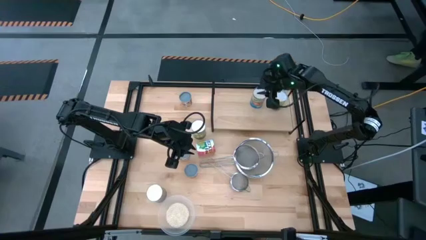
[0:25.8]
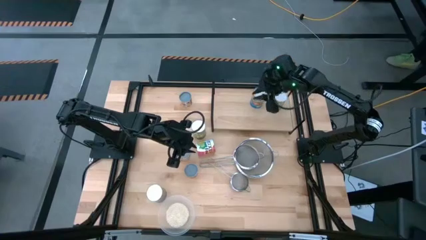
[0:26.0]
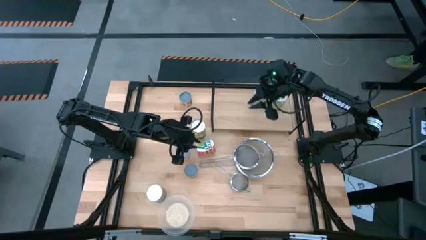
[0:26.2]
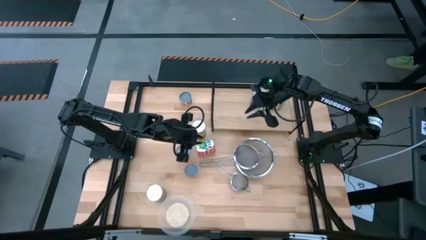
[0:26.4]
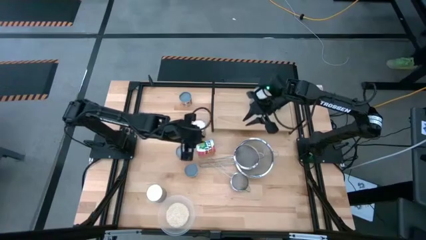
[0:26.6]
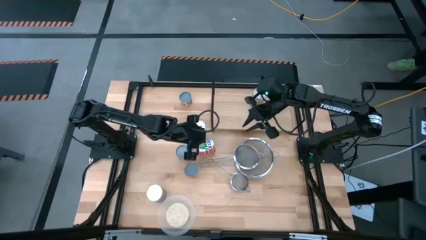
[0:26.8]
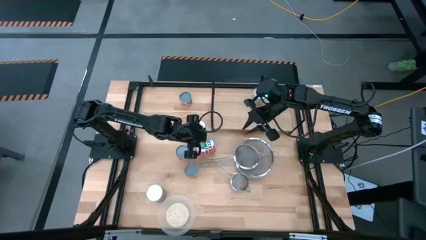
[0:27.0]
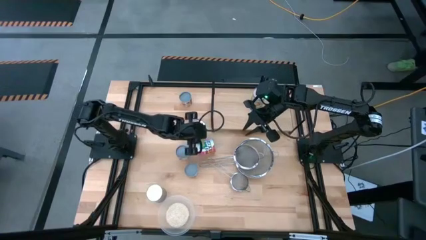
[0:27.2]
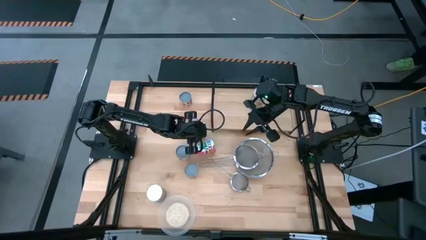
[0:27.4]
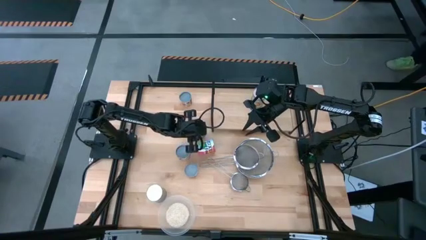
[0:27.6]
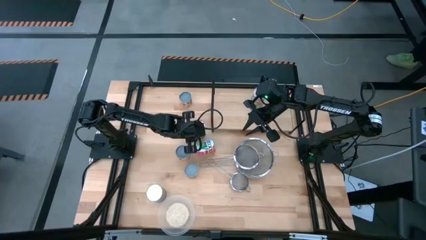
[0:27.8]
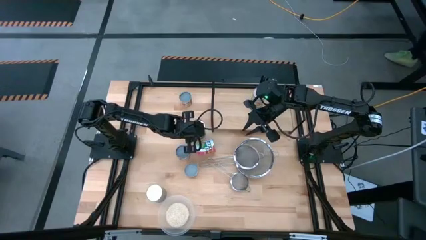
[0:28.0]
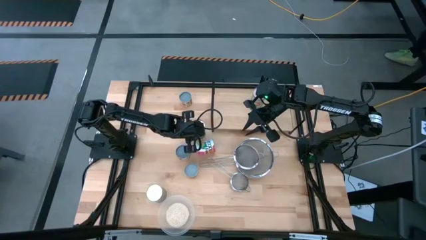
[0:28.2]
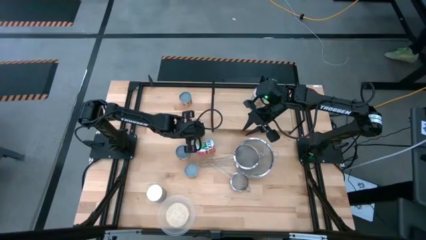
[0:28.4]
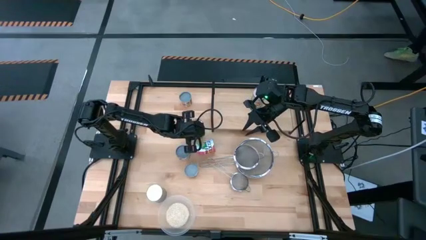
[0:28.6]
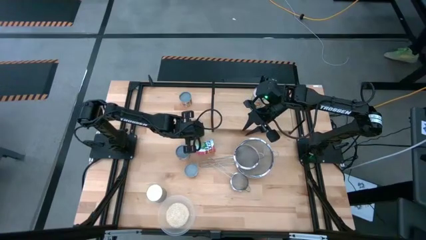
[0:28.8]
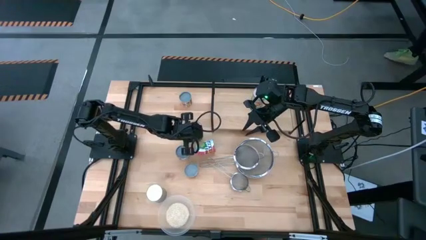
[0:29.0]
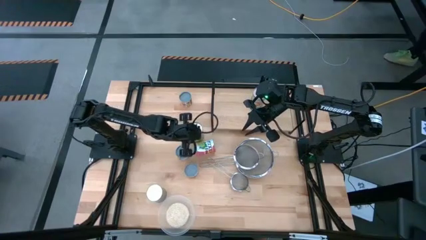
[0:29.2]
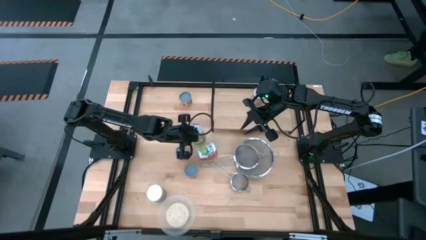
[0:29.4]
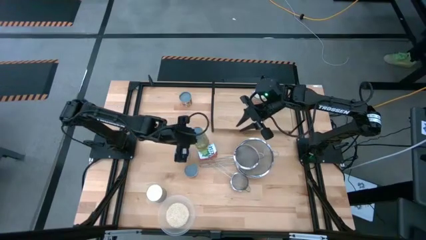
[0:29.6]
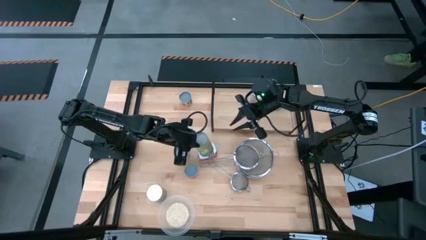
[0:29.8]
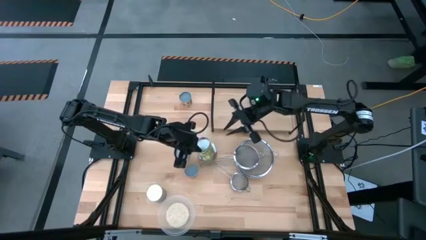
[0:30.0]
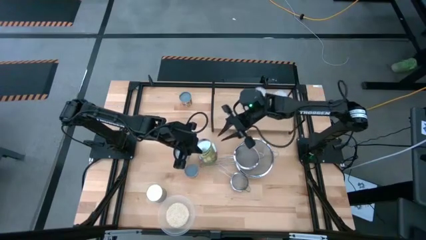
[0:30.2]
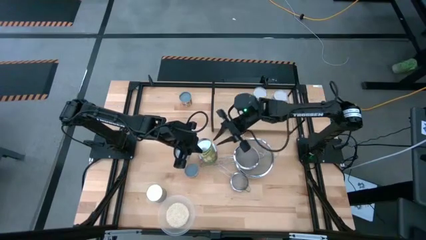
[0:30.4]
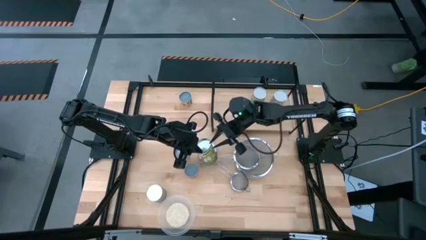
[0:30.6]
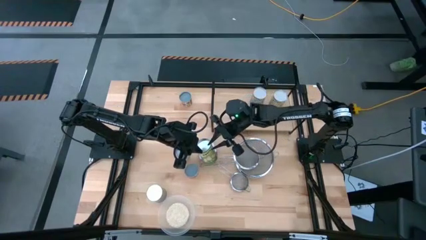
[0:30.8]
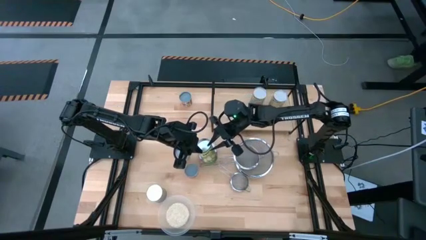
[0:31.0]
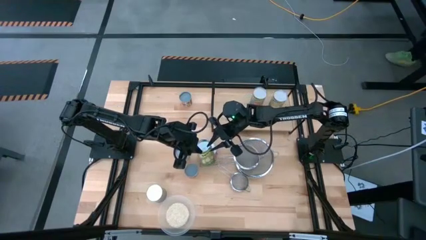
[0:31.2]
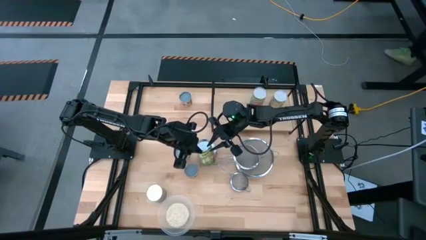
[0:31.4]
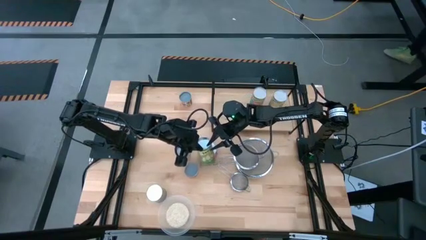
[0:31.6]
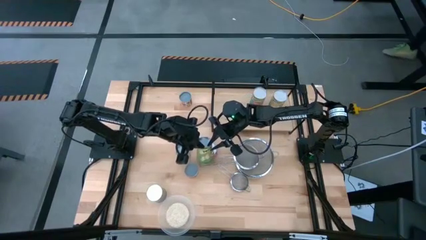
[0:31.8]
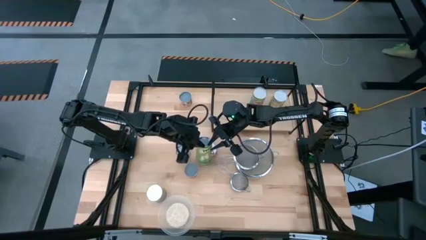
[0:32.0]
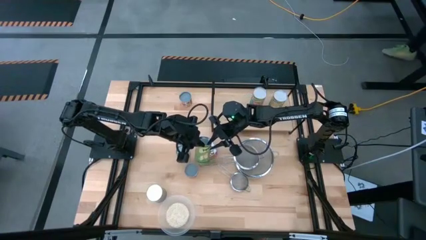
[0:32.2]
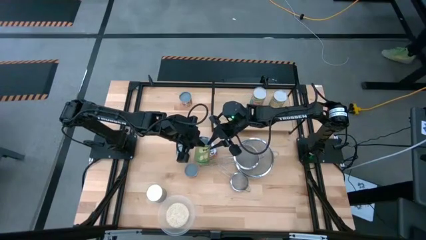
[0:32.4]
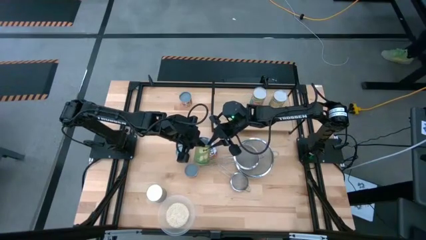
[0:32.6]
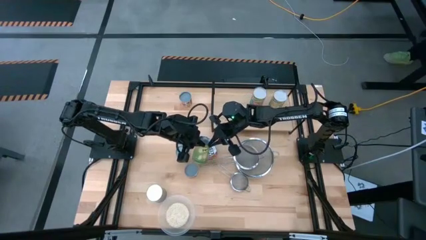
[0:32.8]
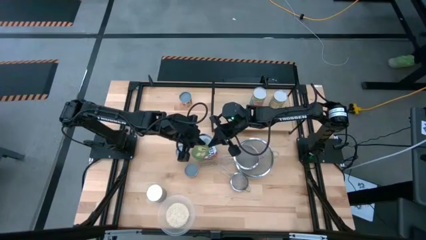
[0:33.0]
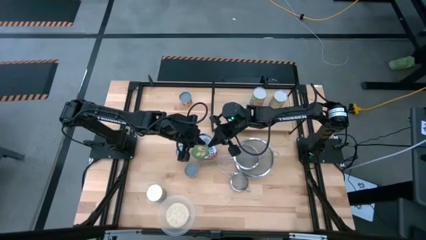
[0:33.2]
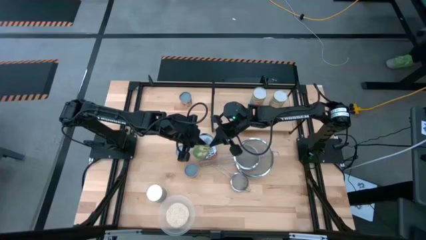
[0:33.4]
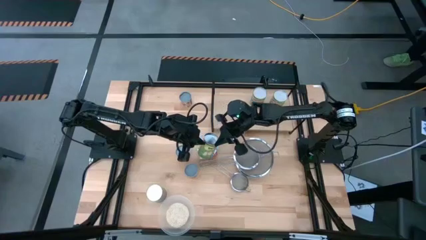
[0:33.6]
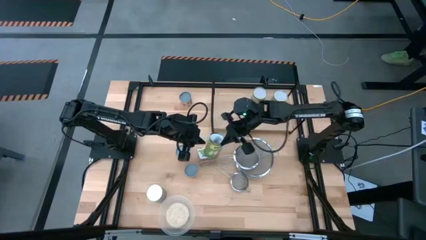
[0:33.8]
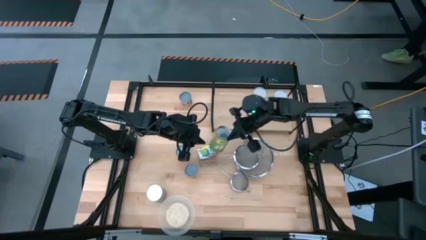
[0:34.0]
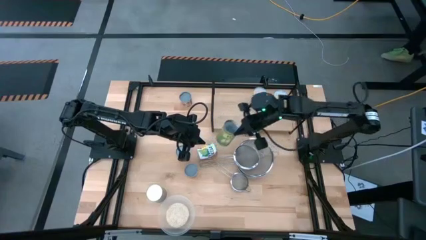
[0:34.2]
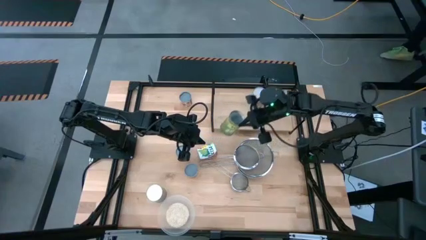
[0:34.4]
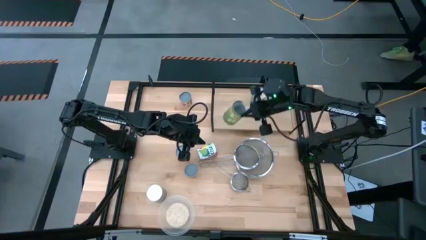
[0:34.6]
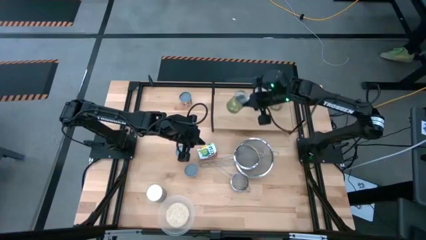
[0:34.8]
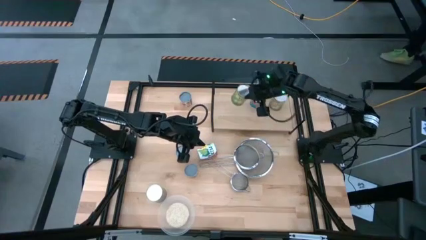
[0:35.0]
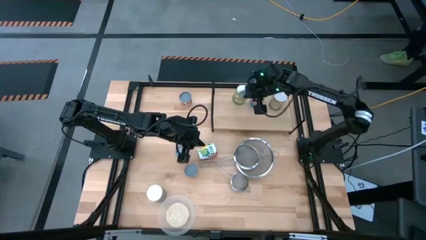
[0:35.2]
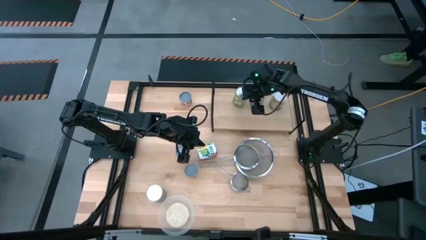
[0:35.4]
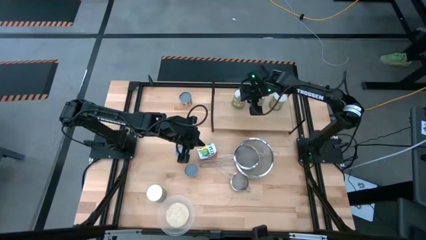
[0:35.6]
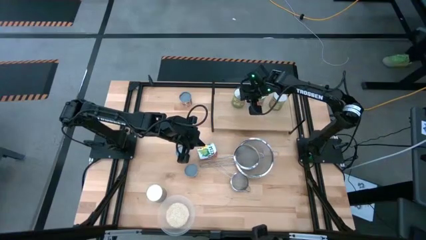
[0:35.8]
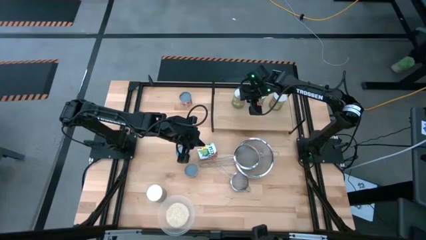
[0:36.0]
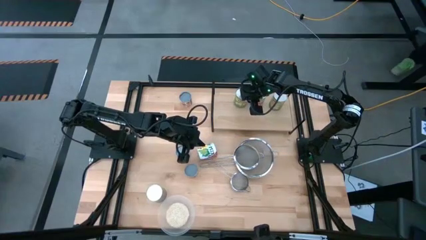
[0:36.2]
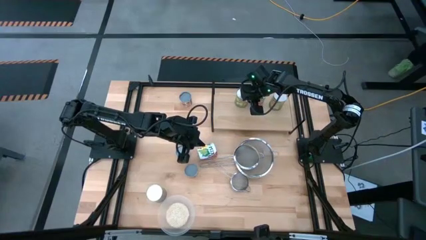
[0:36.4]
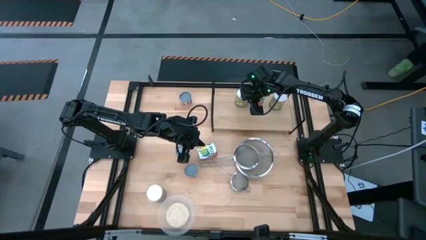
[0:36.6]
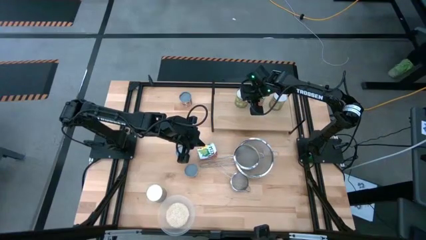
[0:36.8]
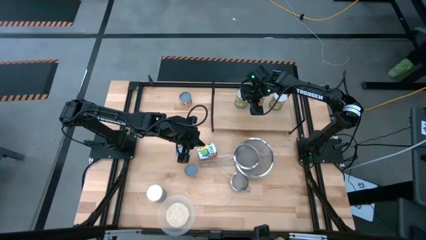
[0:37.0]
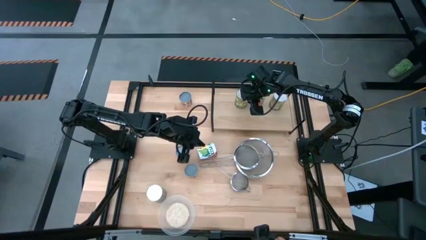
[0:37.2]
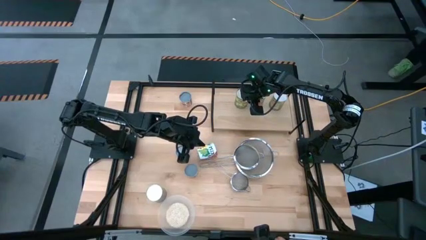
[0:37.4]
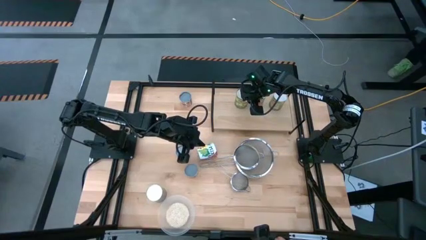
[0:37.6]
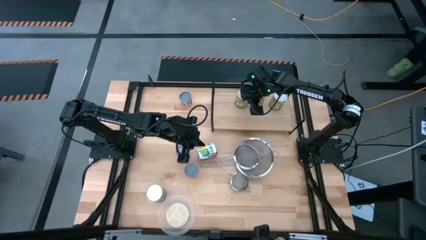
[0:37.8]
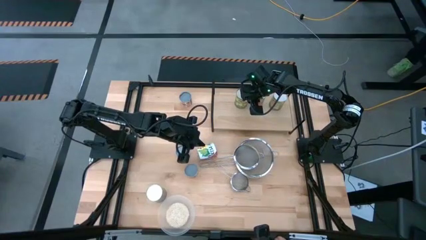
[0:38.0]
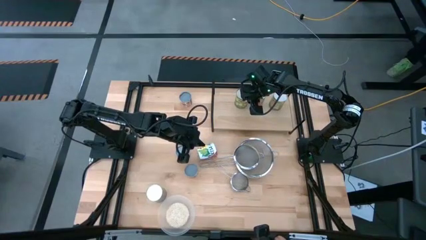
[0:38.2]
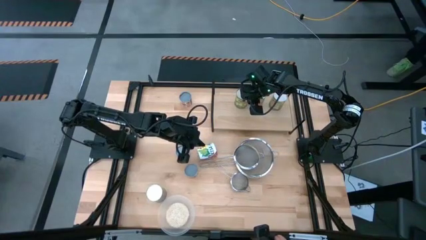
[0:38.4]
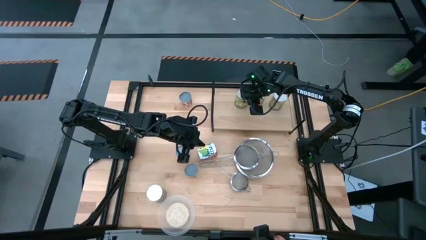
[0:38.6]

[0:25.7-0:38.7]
Task: Pick and place cans onto a shelf
Put the canned pears on the shelf
